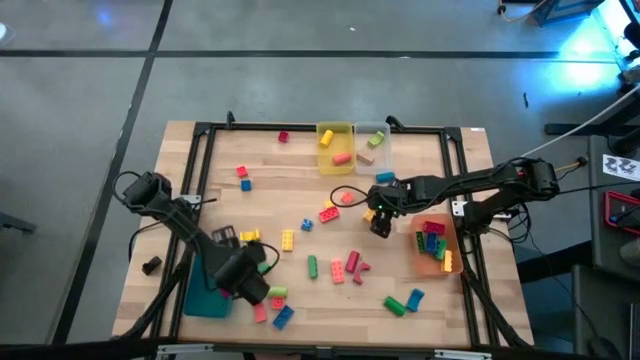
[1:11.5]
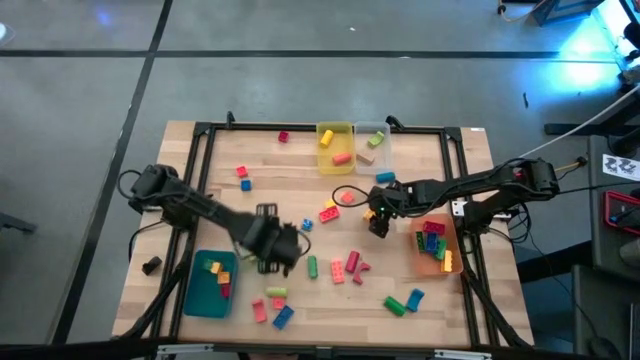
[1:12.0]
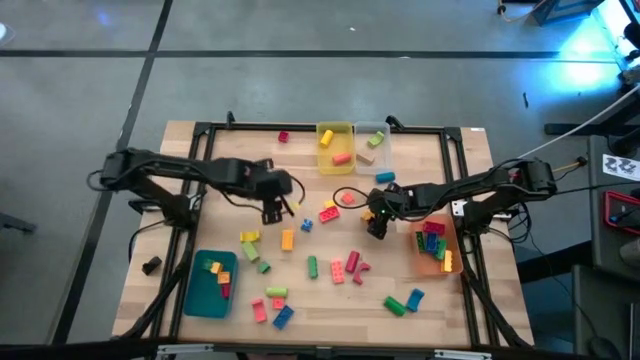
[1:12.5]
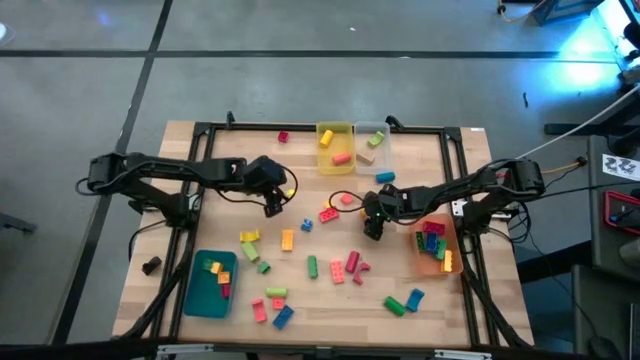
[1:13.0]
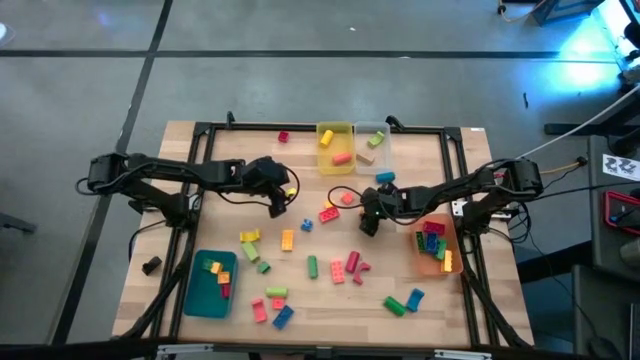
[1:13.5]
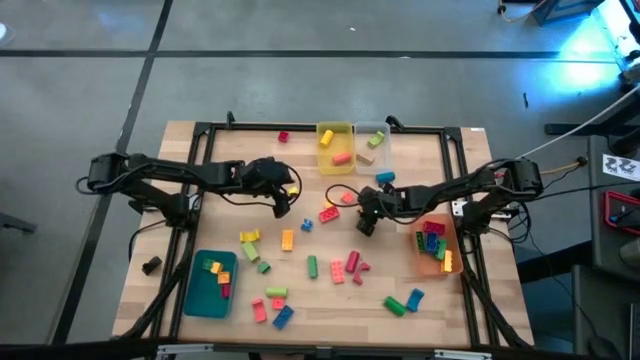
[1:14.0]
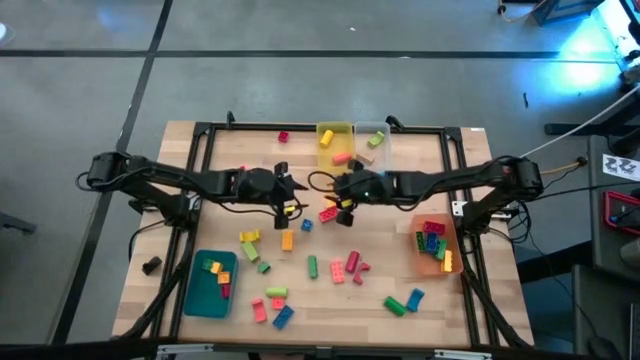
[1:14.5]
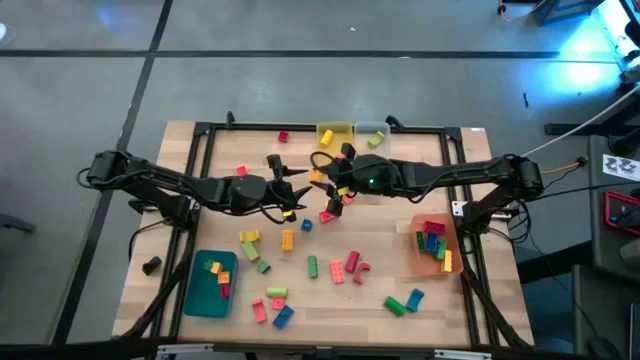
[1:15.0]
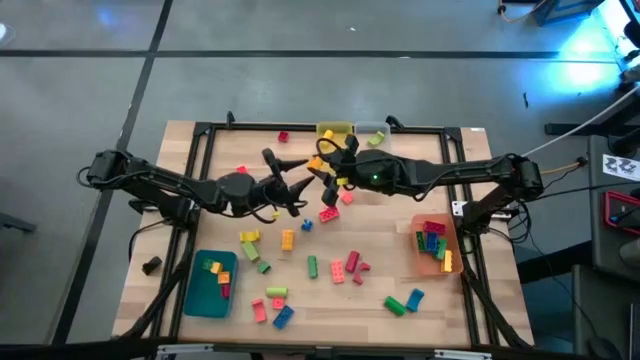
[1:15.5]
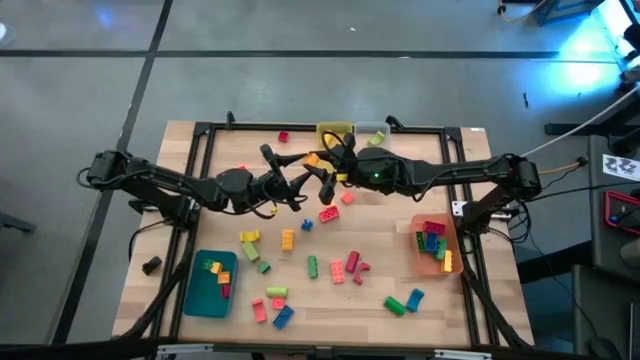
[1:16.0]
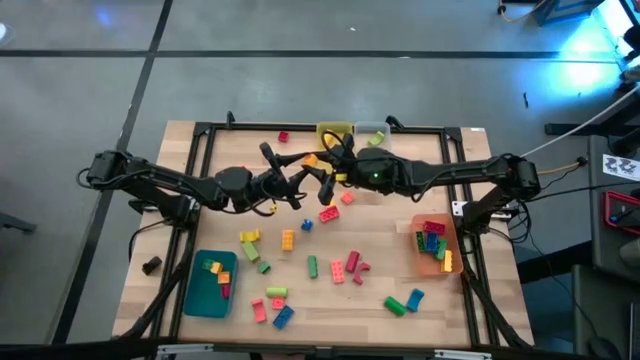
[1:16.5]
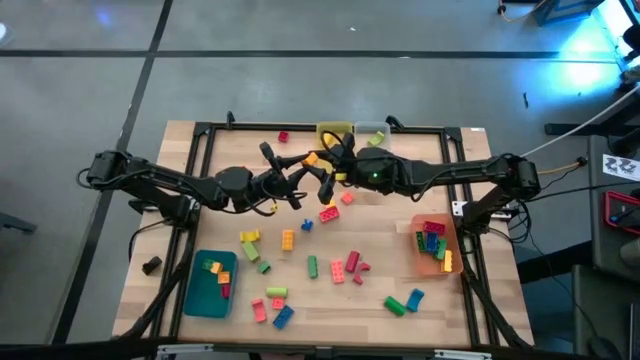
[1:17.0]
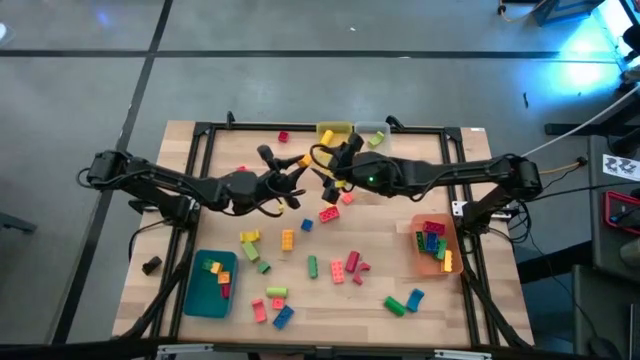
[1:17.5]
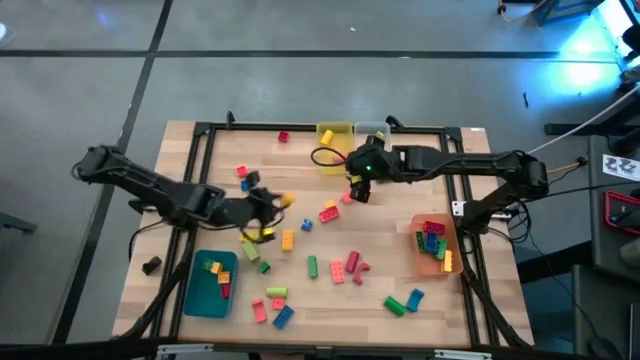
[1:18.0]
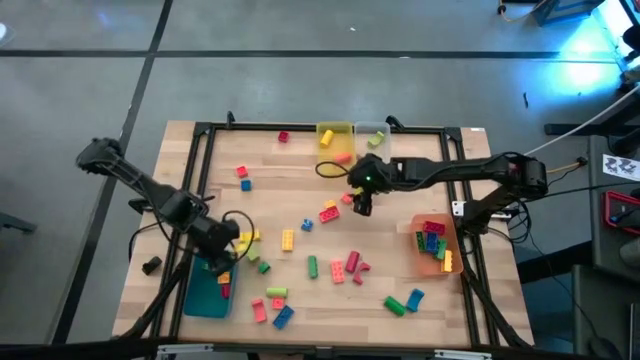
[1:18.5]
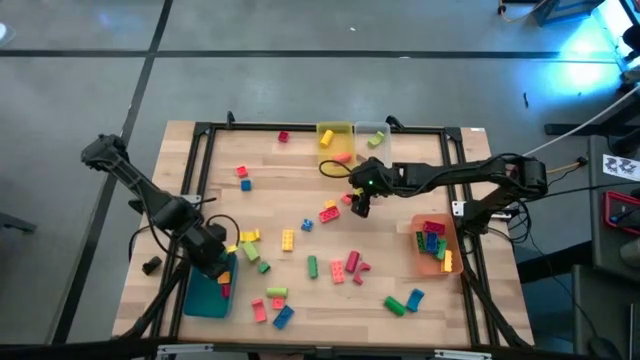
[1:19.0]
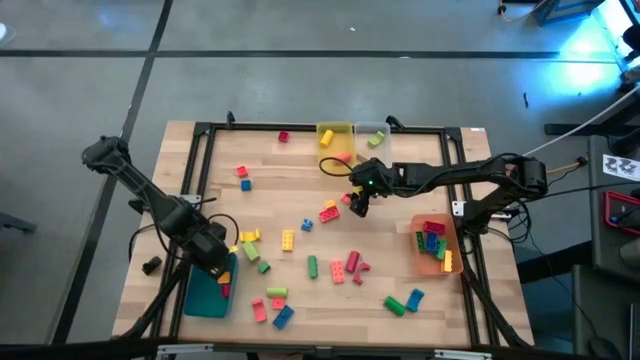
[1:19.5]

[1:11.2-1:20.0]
Task: Sort blocks by size
Put the yellow square game piece into the blue bin

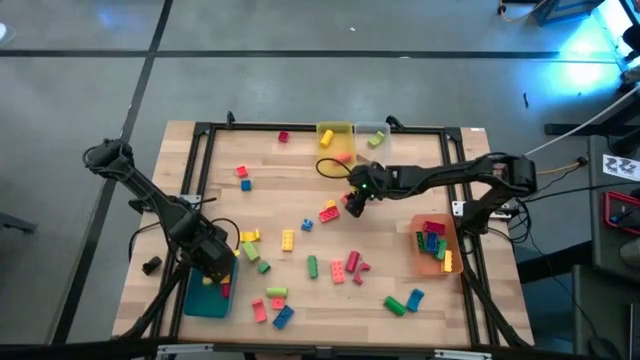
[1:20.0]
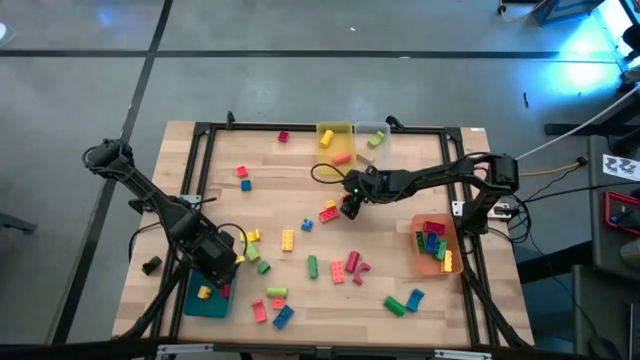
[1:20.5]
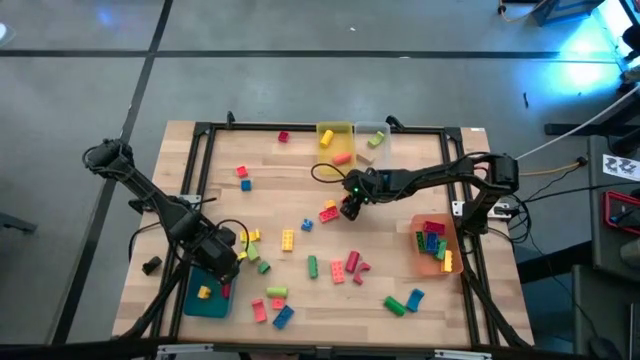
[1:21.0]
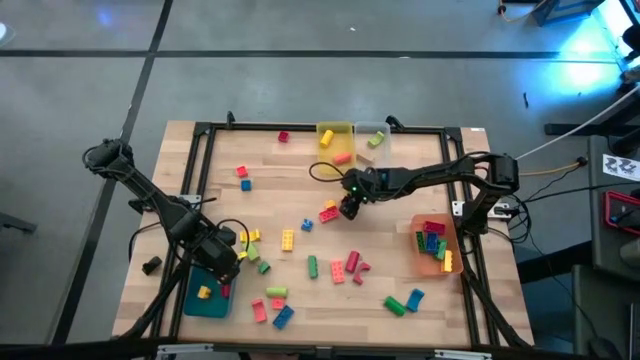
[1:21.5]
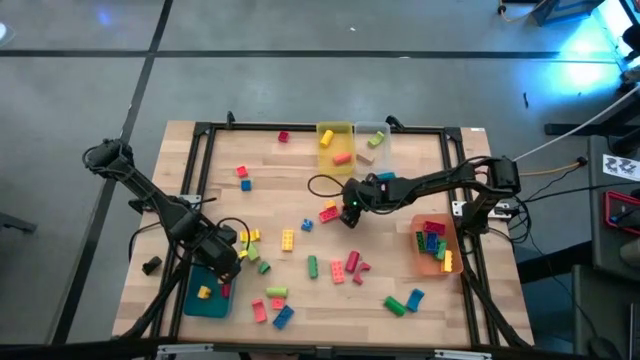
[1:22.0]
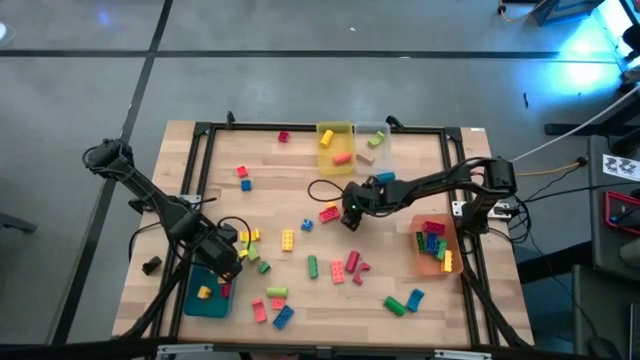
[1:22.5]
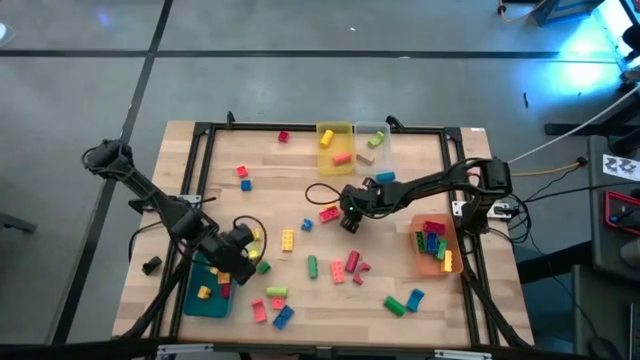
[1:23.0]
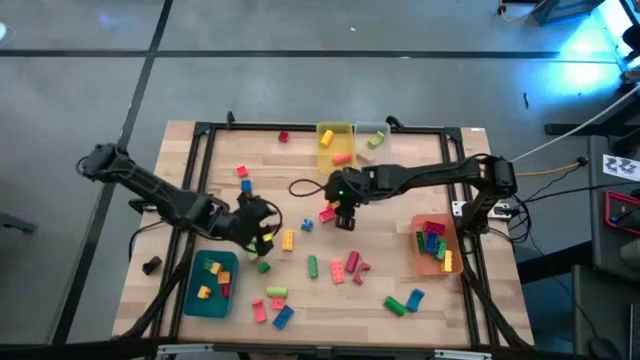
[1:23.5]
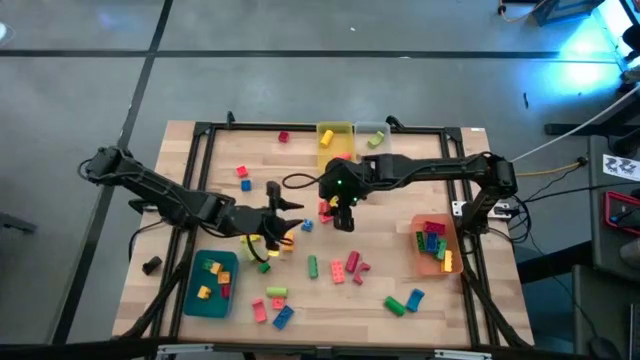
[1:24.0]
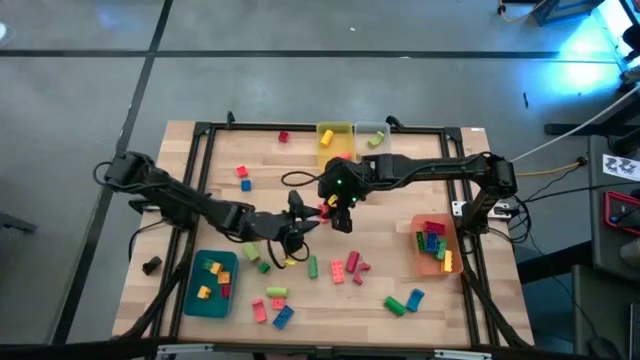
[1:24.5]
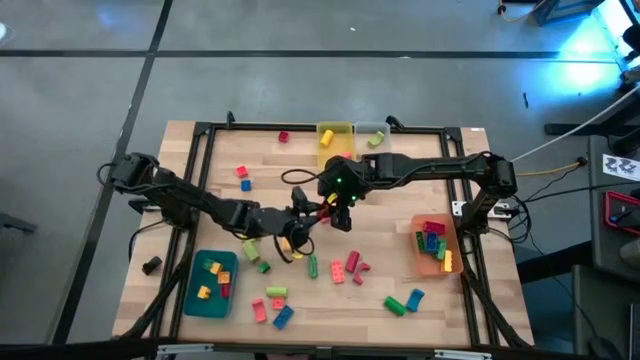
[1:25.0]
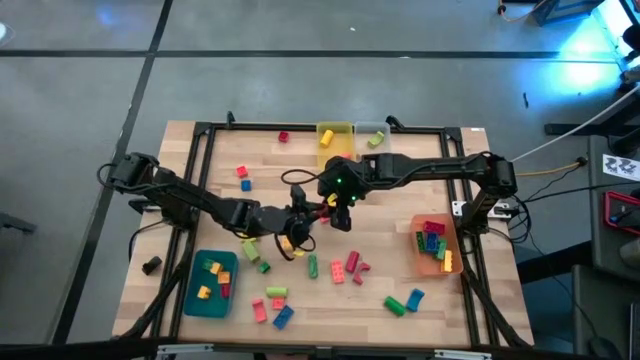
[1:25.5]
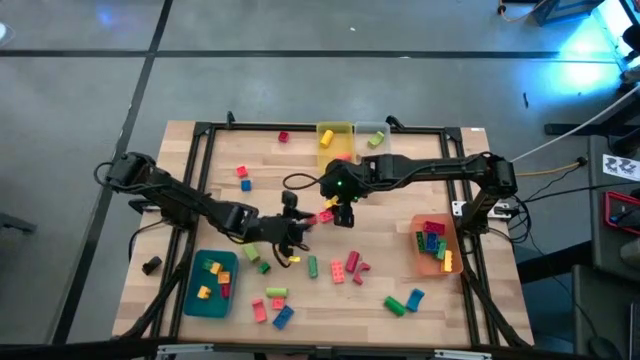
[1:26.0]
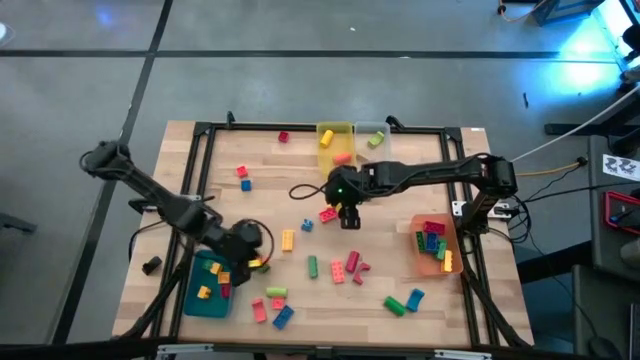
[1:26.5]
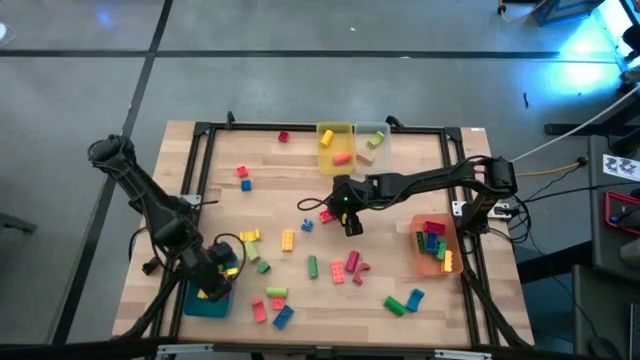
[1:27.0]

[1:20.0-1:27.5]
Put the orange square game piece into the blue bin

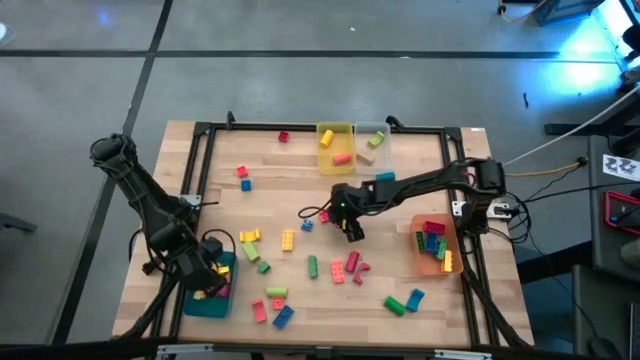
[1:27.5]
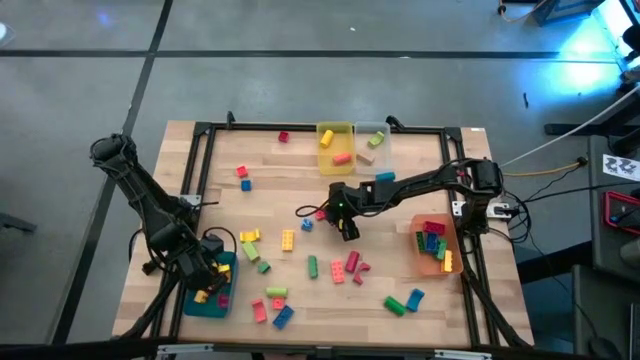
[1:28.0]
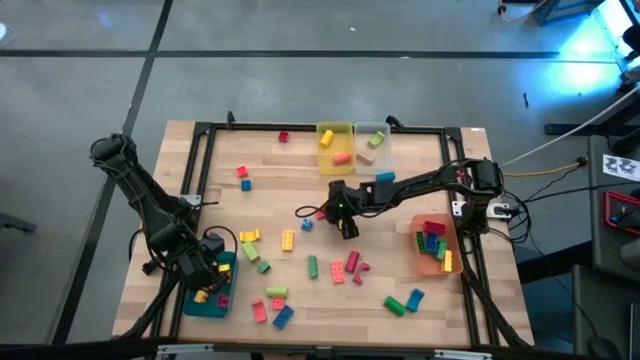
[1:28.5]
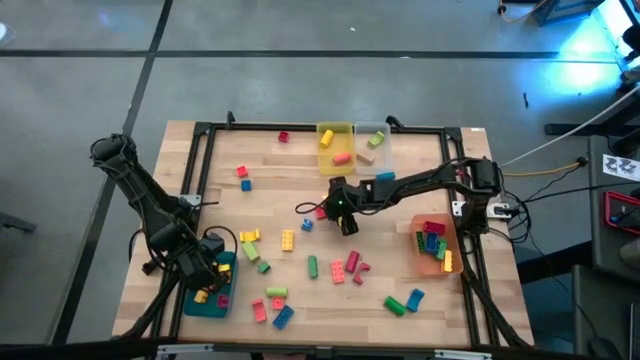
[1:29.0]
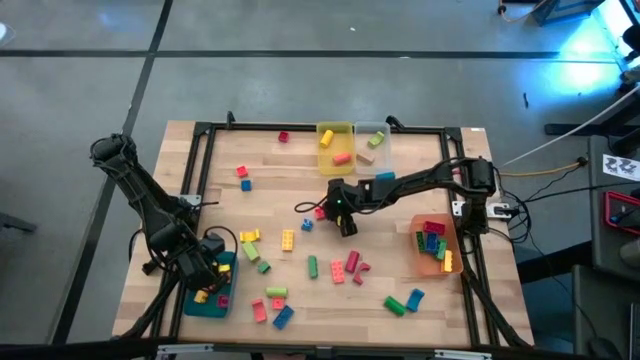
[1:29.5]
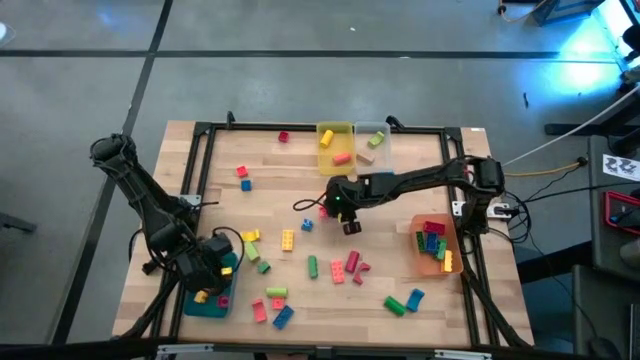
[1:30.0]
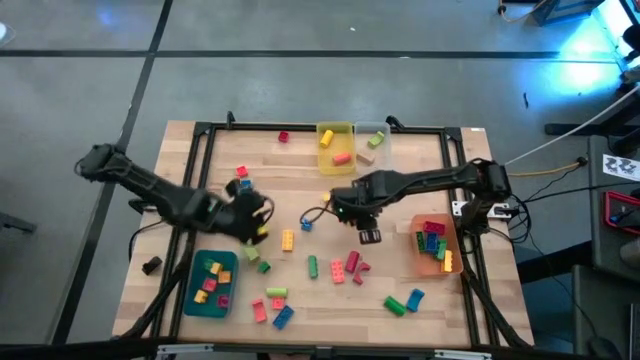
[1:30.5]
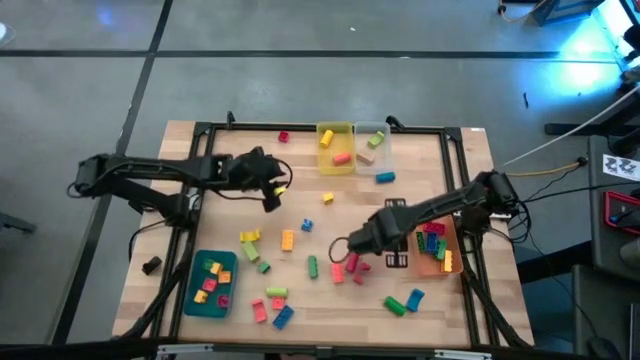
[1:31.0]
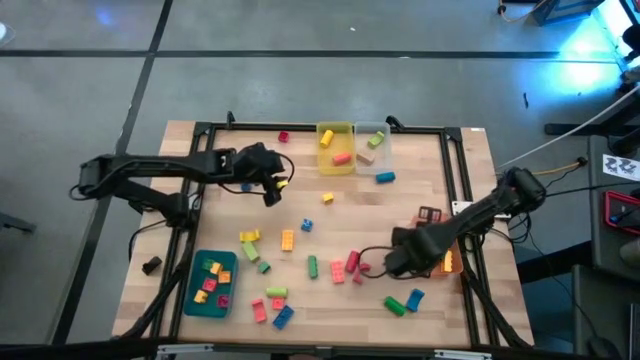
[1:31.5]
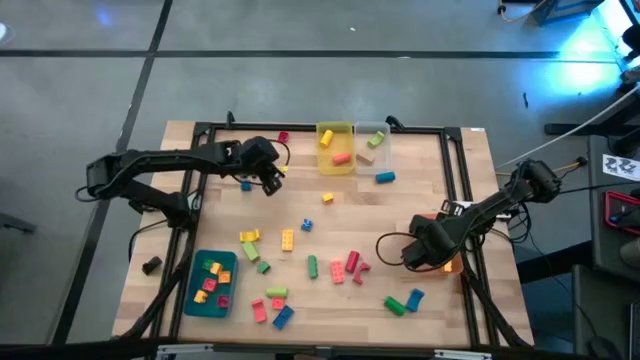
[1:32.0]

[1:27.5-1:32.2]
Put the orange rectangular game piece into the orange bin
